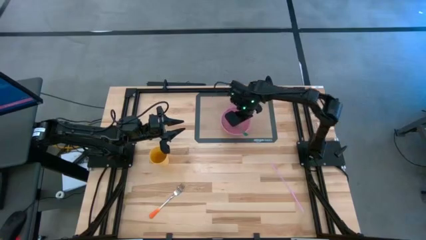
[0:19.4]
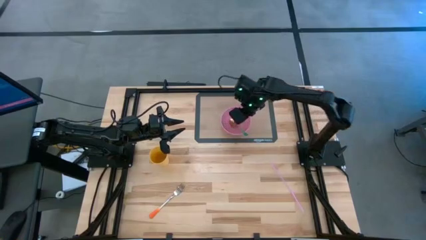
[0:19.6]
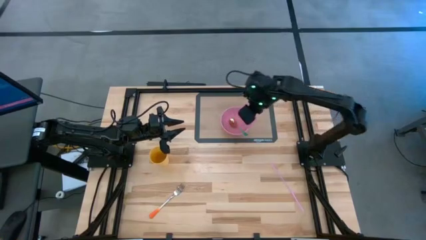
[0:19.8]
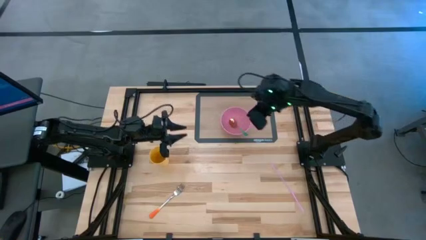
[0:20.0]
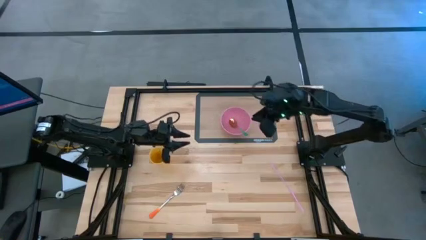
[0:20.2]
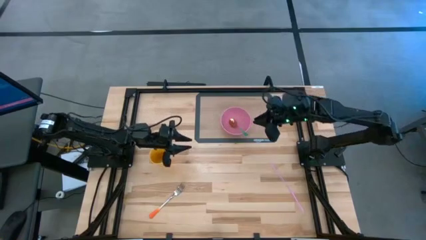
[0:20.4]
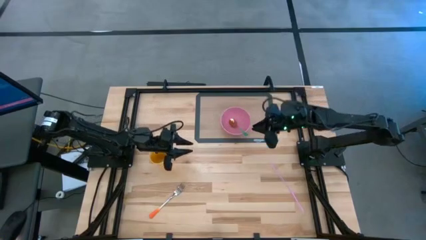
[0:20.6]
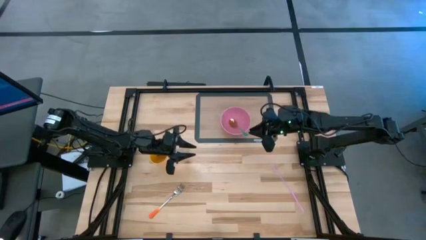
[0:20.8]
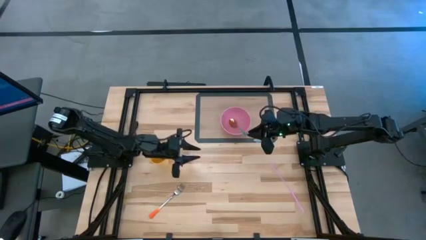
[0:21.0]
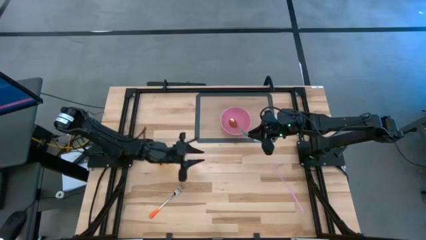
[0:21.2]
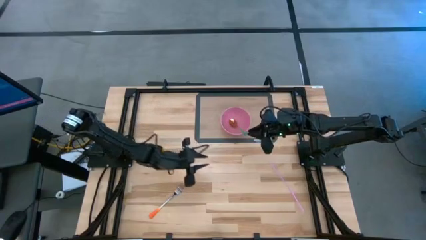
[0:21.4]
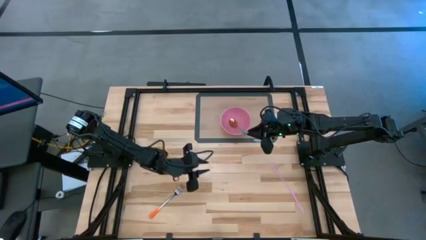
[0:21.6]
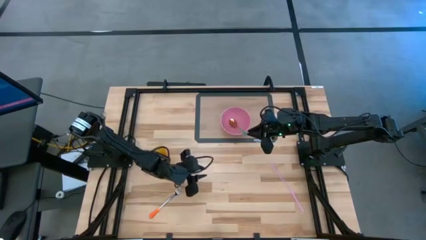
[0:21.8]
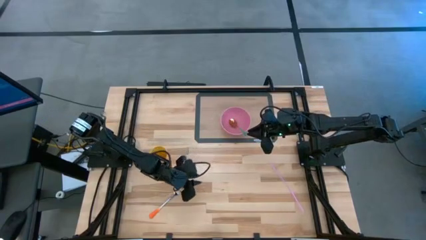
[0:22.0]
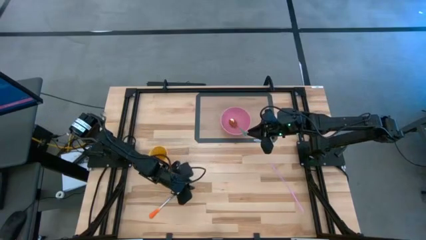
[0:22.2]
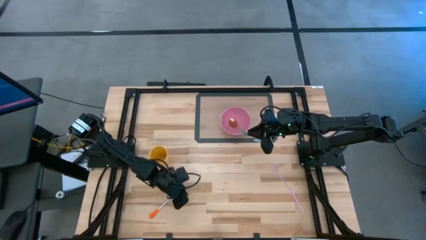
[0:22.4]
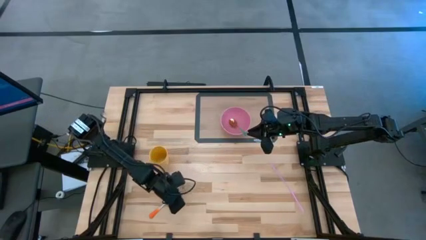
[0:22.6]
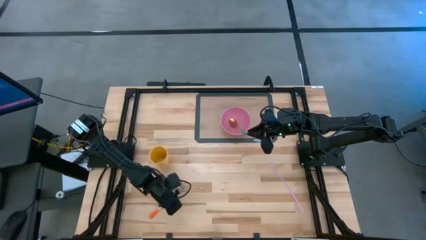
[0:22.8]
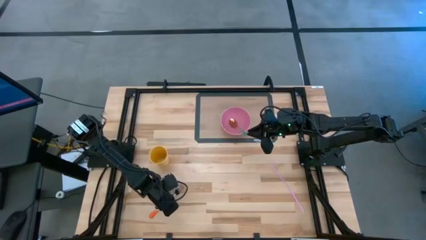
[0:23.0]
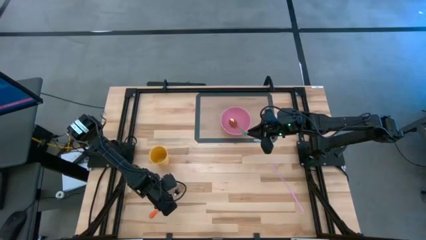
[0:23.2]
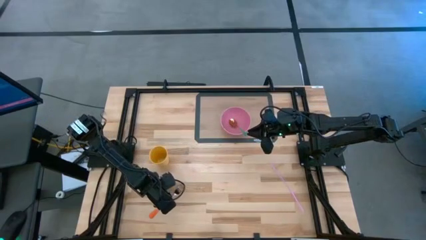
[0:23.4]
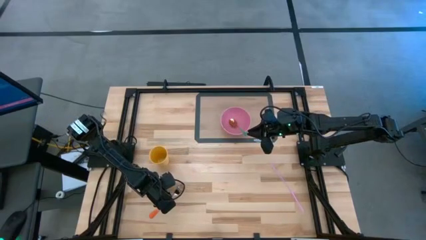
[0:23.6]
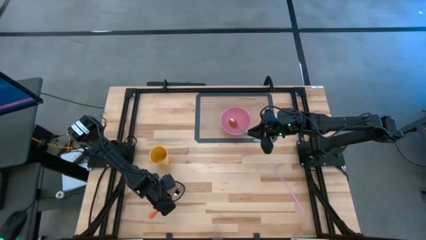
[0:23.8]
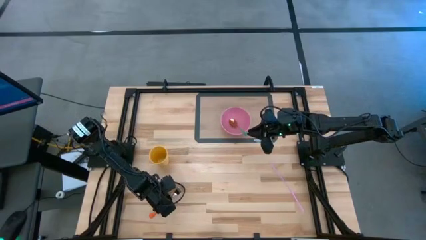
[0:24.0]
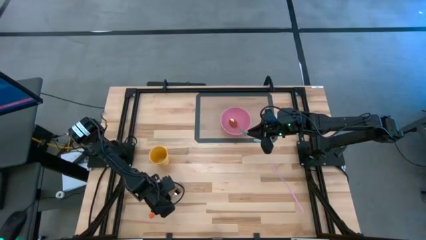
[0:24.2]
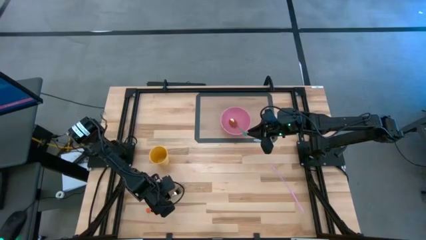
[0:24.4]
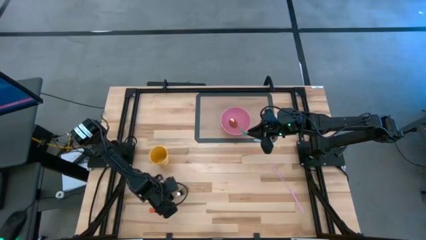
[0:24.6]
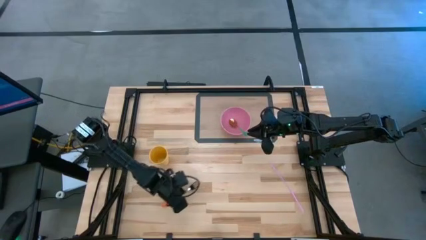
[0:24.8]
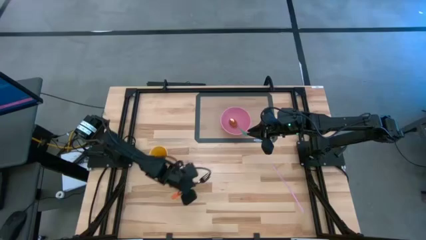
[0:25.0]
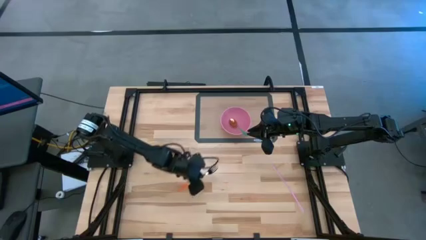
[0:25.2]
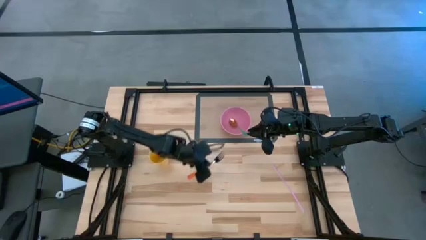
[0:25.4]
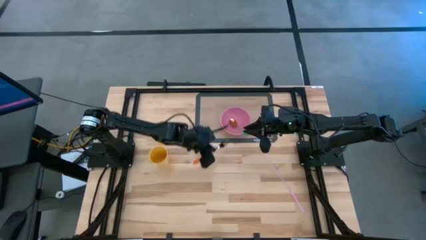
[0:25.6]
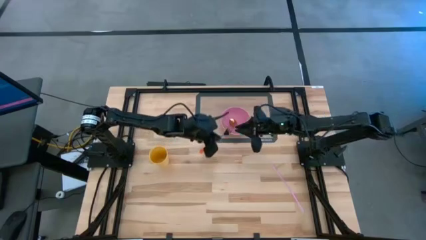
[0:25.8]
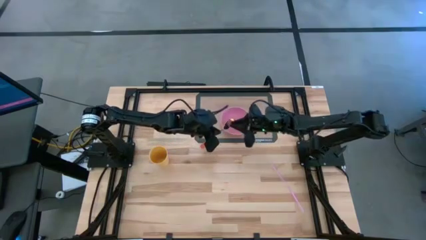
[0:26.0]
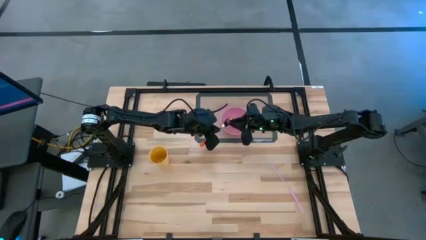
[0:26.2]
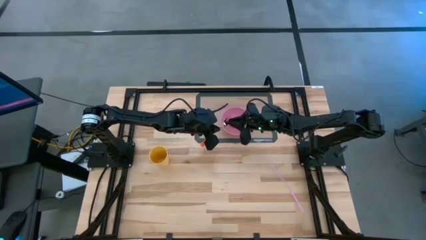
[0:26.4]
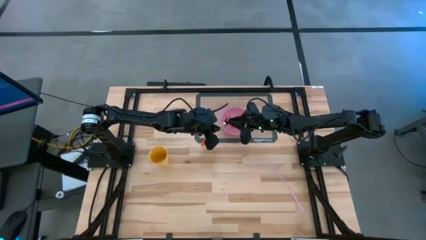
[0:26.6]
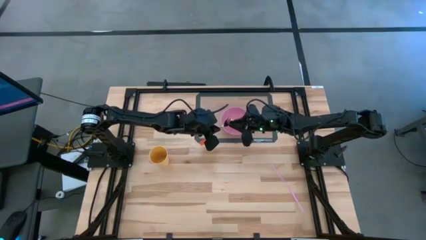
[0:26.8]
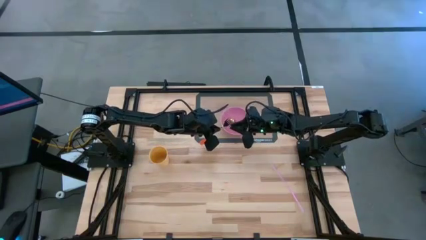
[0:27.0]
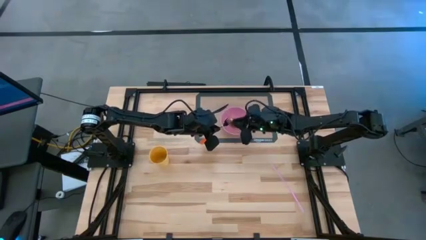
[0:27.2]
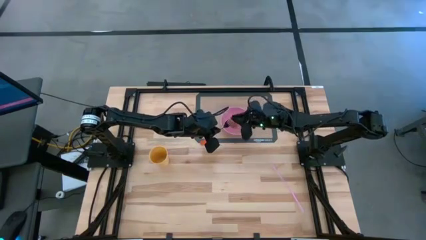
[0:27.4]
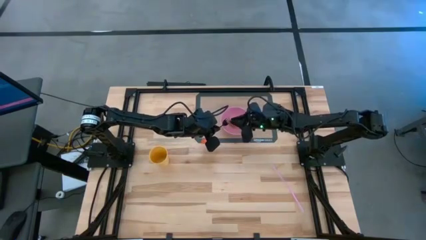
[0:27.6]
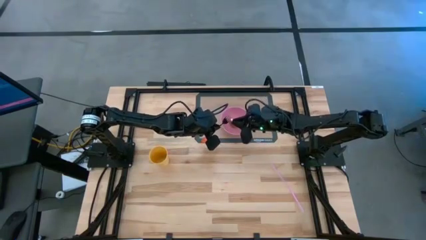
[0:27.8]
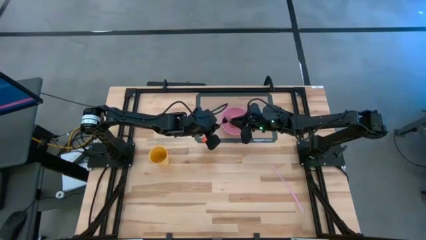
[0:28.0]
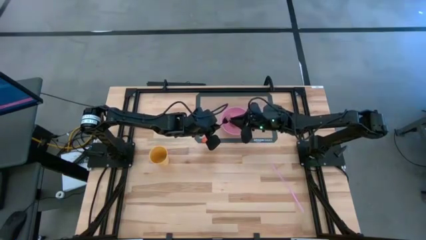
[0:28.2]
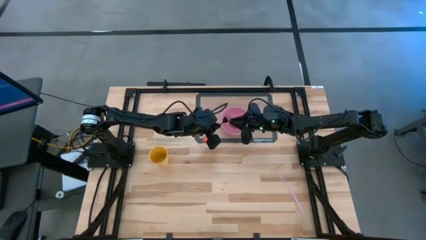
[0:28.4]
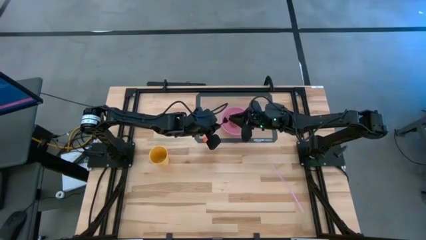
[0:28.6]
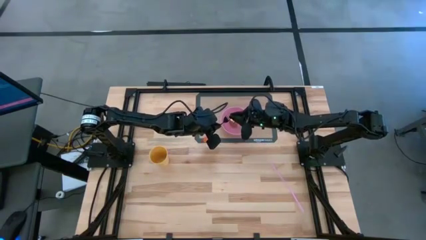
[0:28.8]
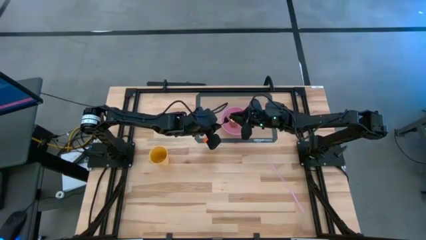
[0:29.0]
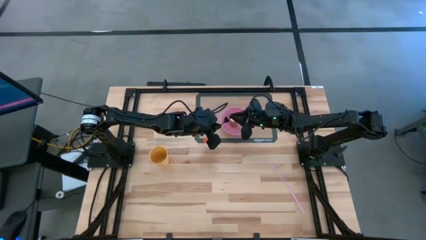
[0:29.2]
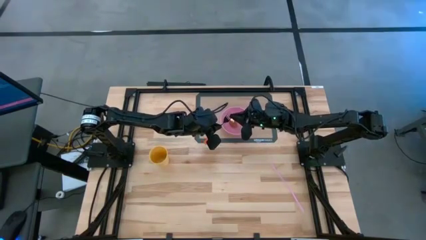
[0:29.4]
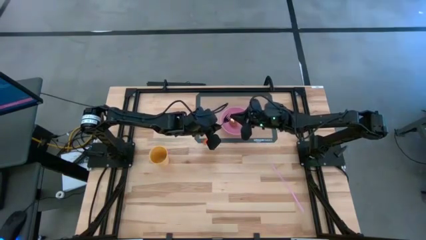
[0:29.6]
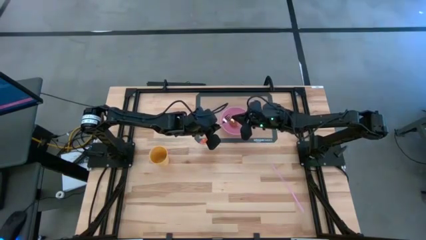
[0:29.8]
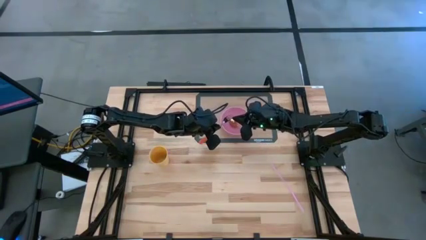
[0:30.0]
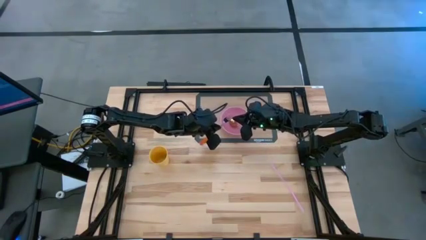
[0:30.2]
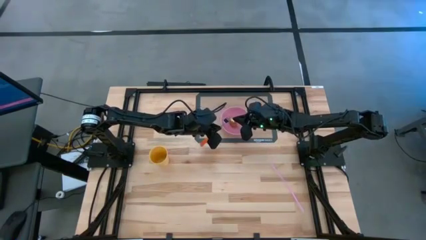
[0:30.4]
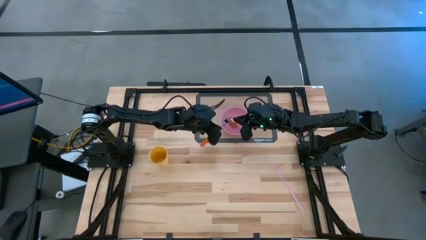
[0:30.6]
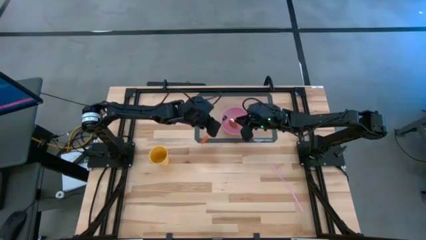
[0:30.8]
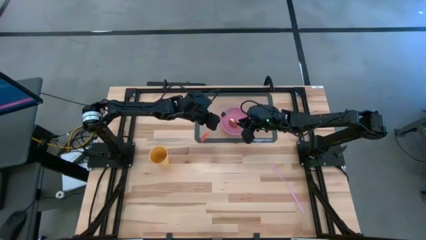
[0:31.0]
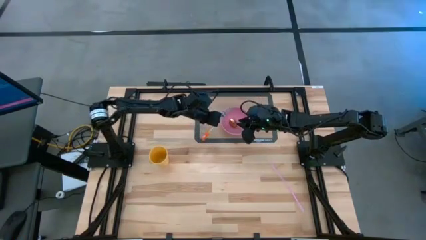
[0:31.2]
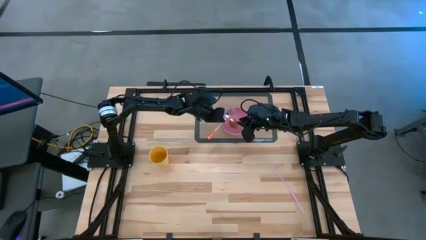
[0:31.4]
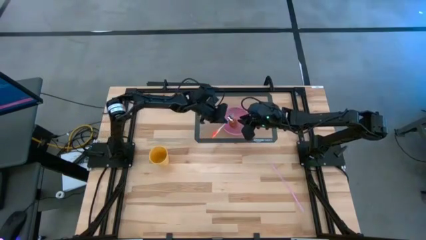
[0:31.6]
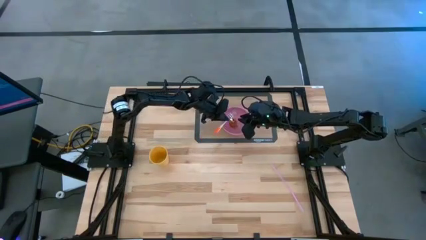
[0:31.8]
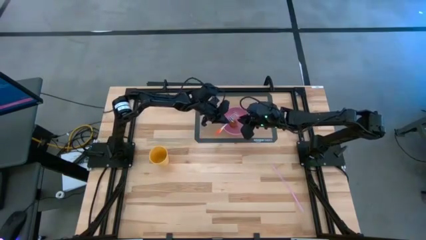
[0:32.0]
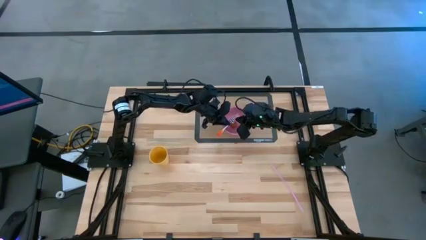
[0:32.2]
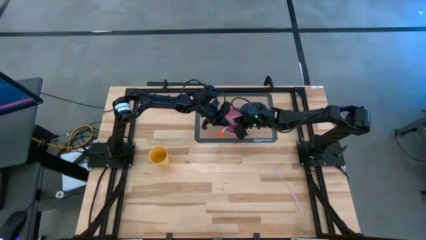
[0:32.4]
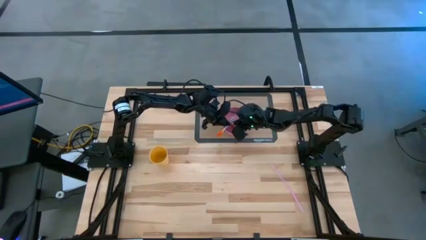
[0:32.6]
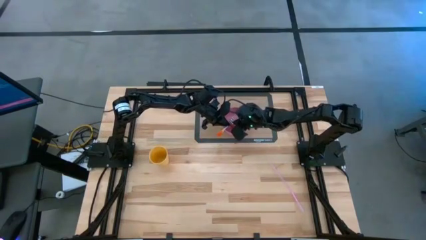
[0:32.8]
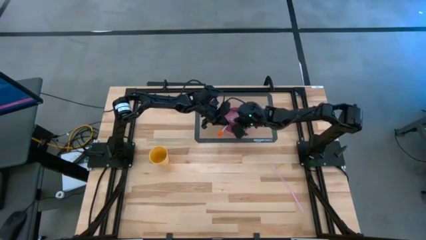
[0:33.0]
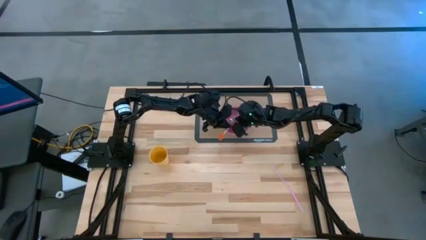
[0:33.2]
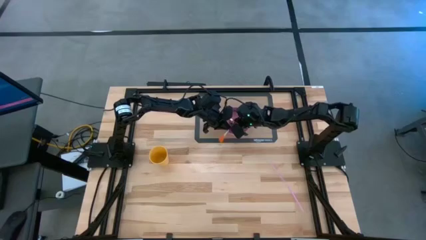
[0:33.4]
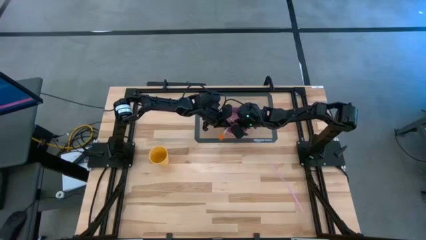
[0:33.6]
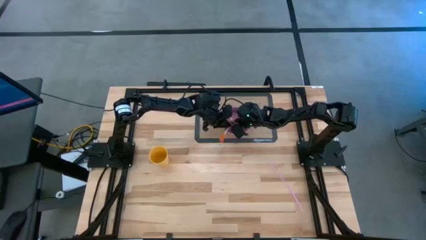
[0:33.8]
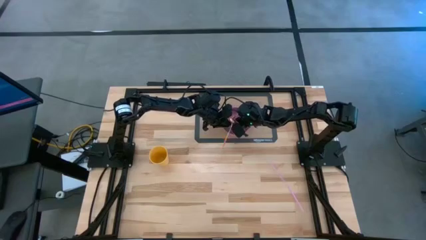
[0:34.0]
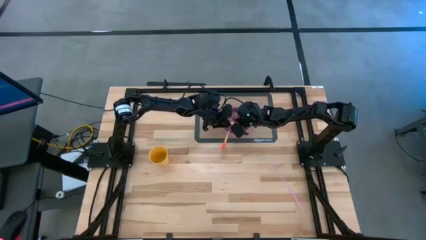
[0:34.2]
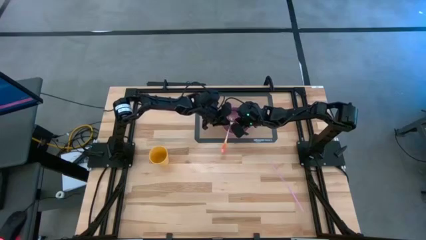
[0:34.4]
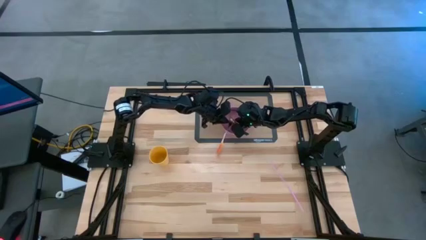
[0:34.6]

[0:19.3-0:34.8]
Task: Pick & Place Utensil
Put the orange fork into the pink bowl
